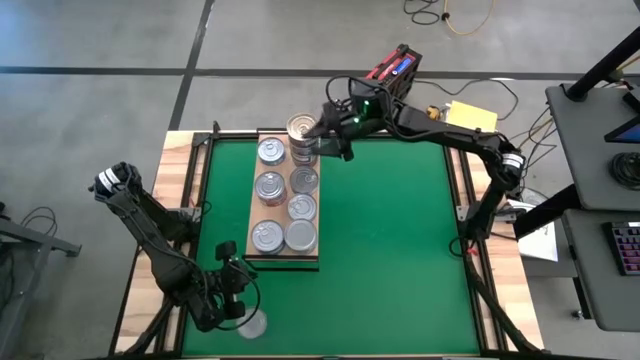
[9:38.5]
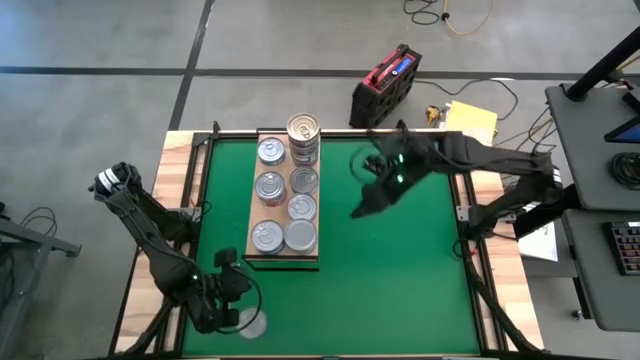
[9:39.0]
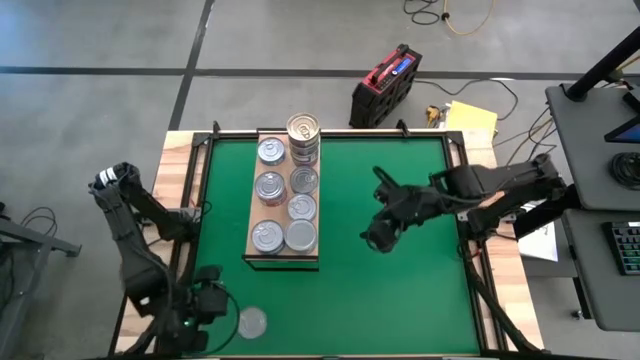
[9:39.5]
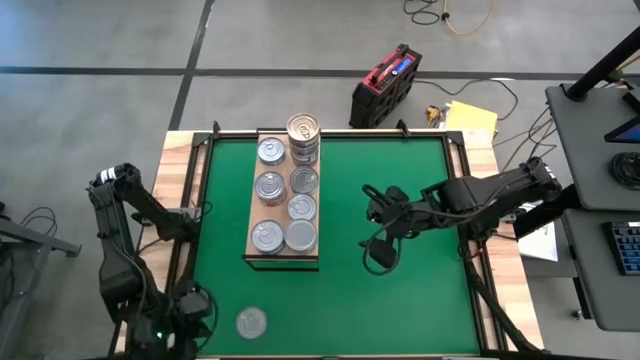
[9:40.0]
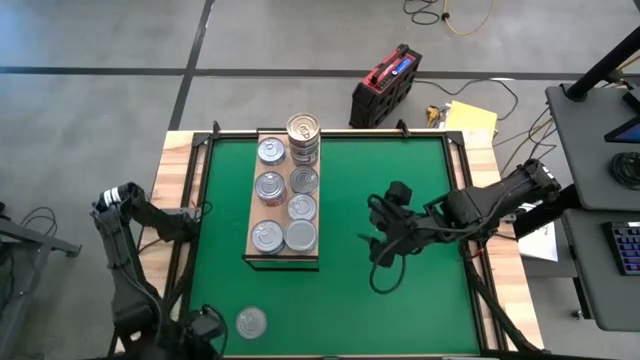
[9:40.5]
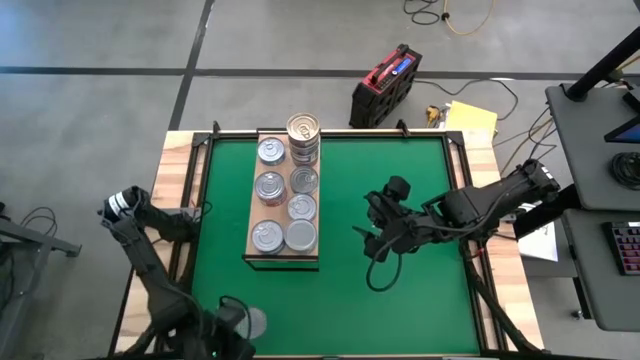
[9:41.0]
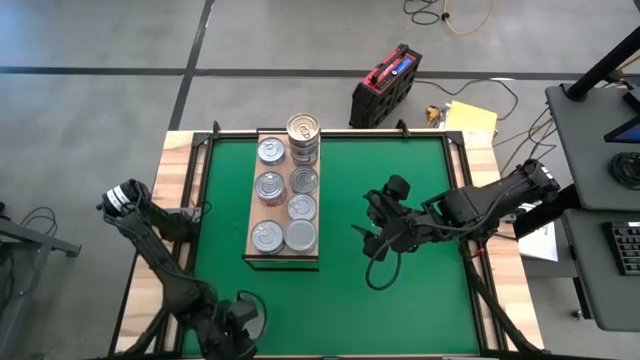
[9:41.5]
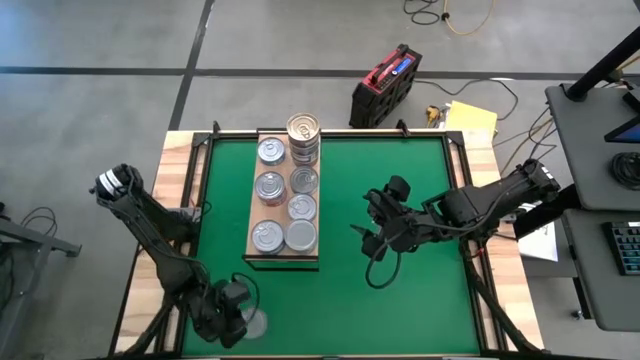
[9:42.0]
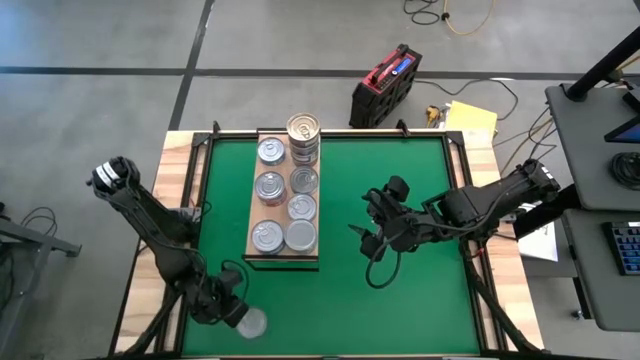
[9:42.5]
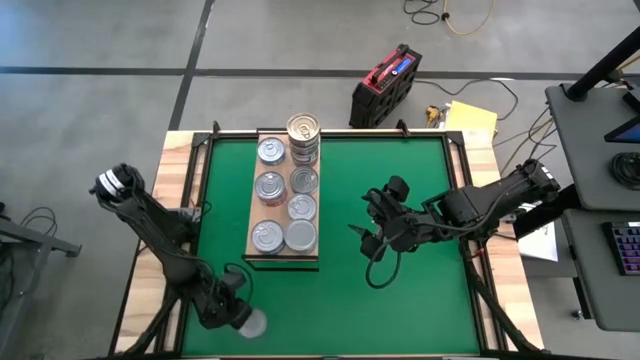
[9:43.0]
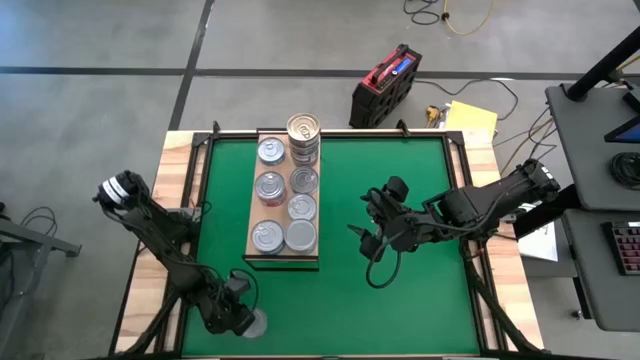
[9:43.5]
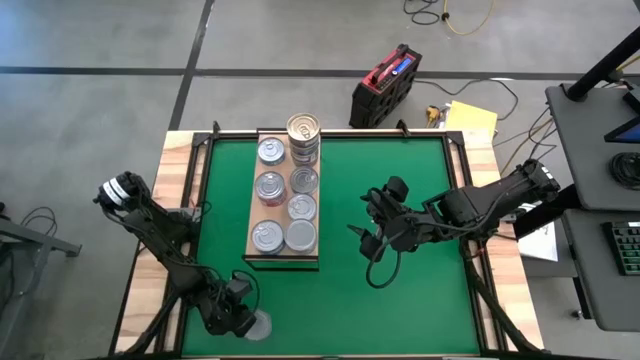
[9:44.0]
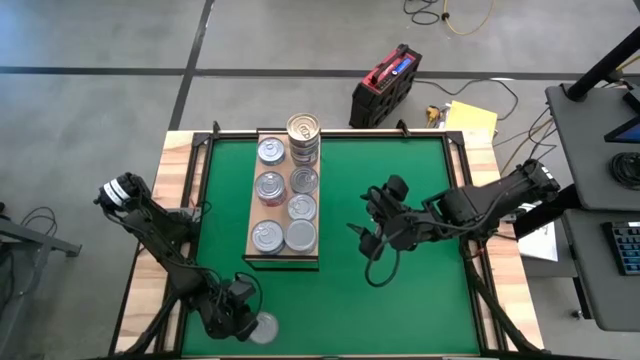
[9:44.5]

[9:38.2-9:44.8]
Task: Stack canned seafood by type on shelf
Stack the blue tuna can on top of the blue tuna cans on the shelf

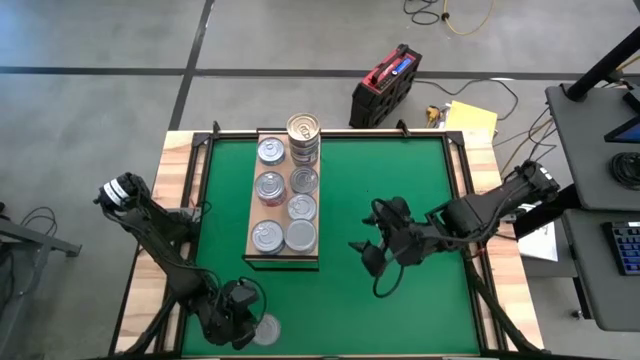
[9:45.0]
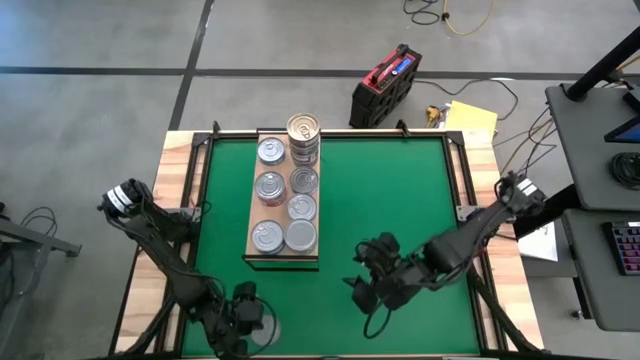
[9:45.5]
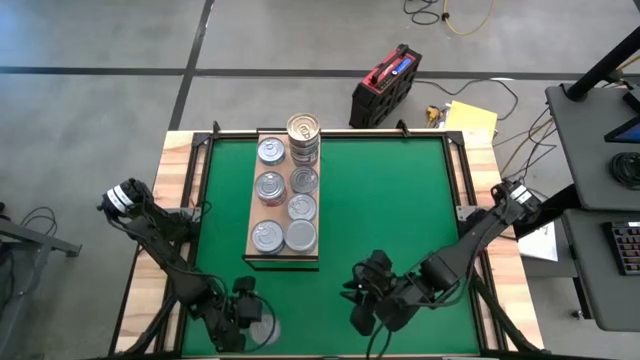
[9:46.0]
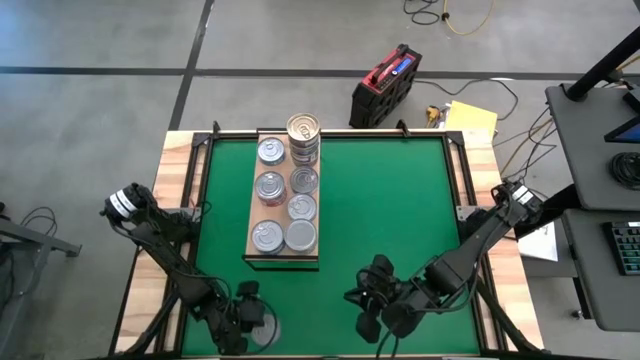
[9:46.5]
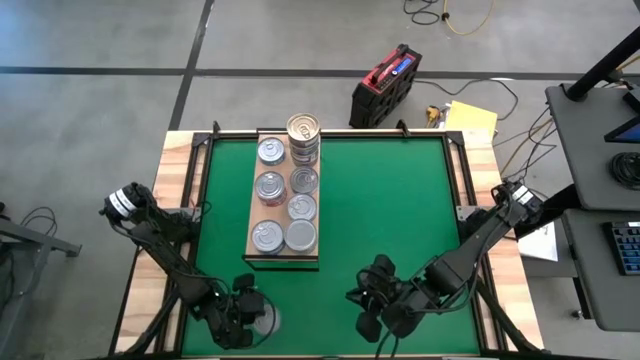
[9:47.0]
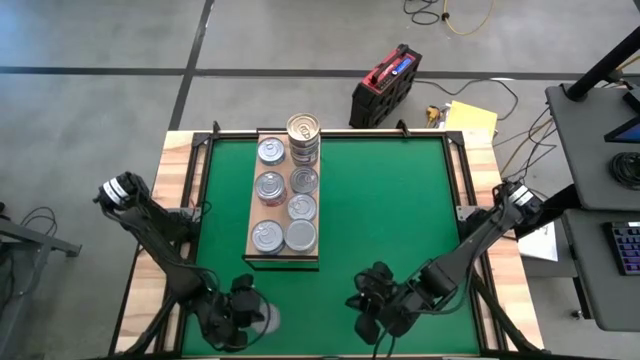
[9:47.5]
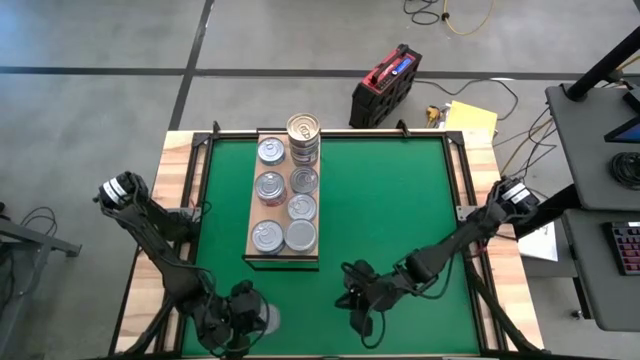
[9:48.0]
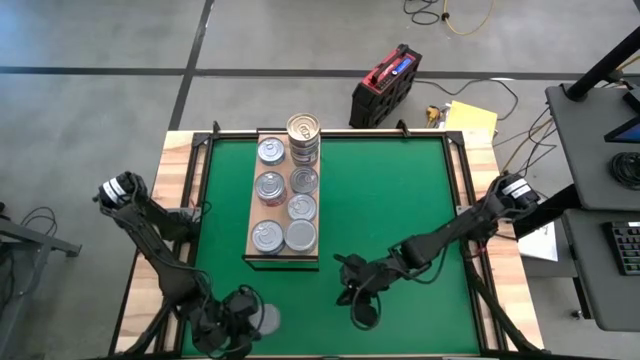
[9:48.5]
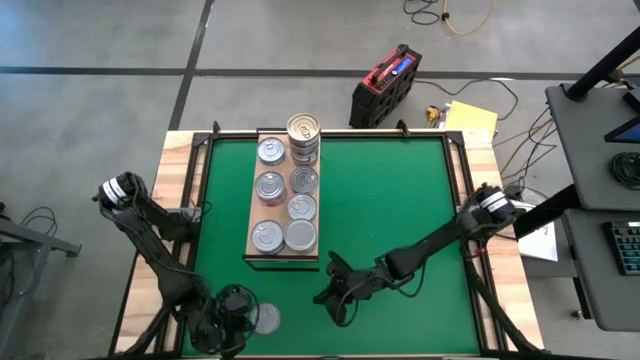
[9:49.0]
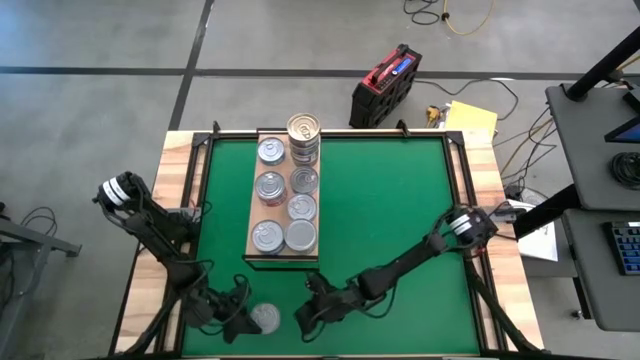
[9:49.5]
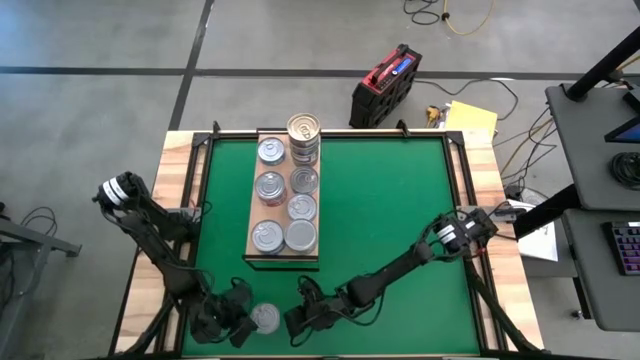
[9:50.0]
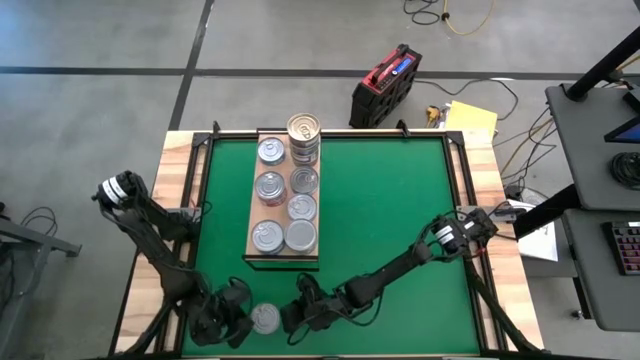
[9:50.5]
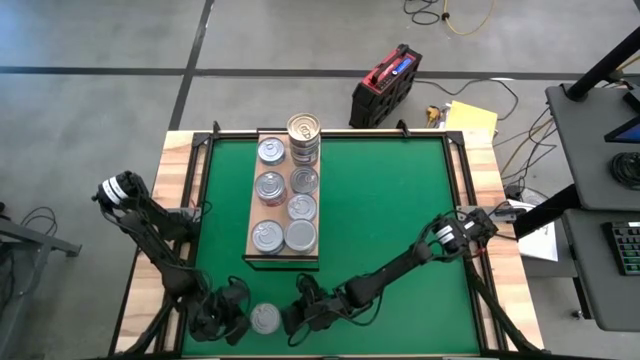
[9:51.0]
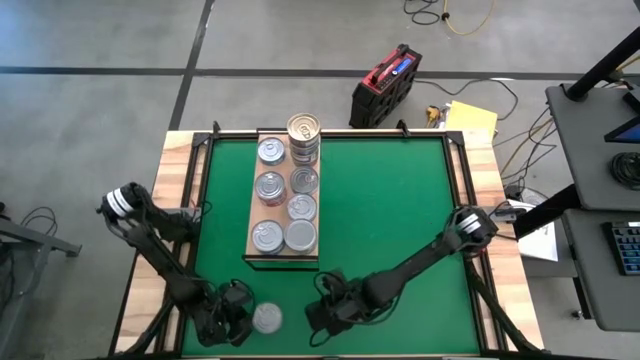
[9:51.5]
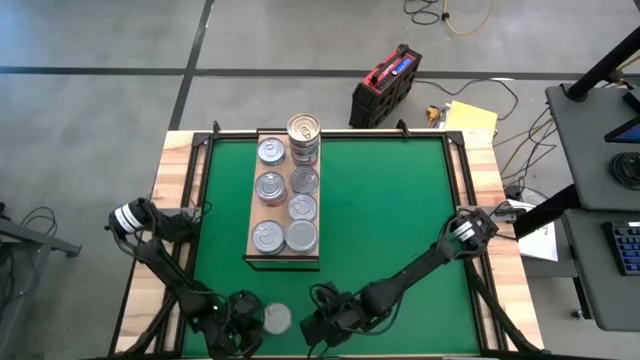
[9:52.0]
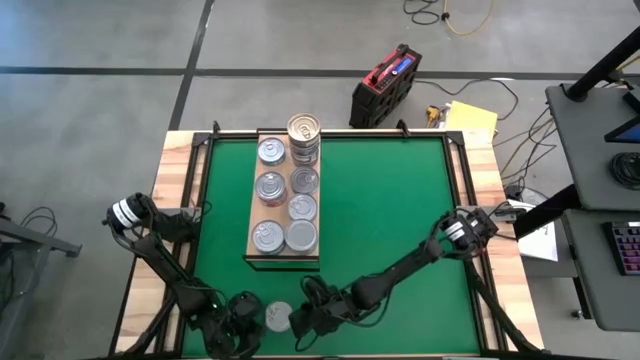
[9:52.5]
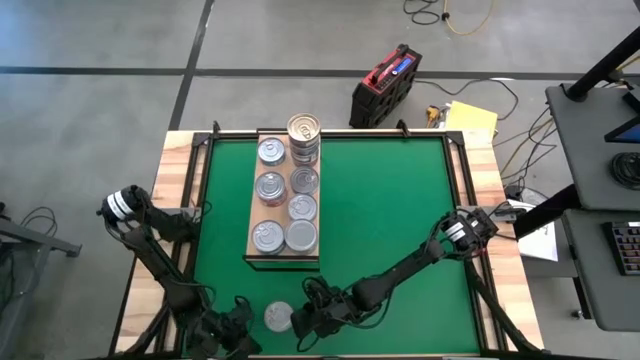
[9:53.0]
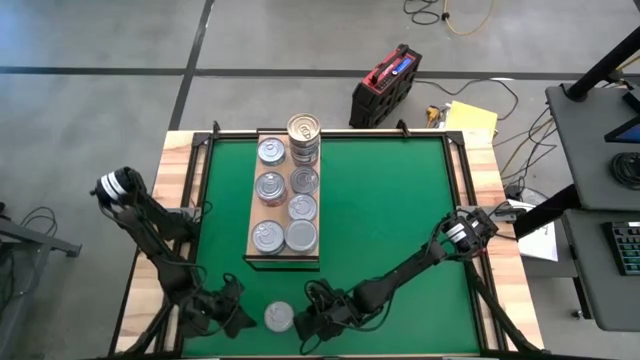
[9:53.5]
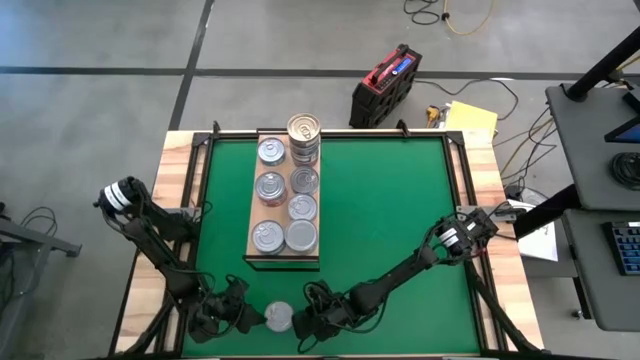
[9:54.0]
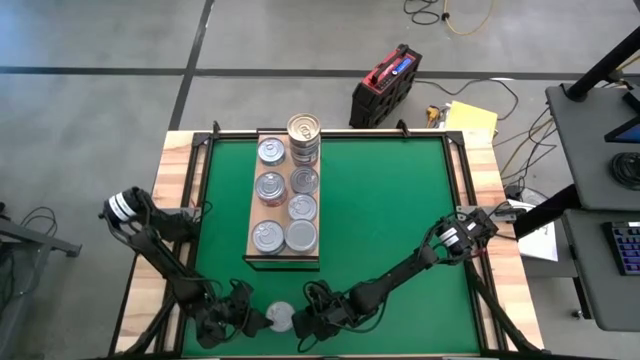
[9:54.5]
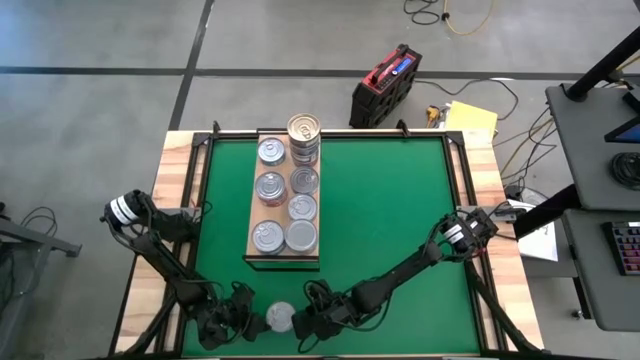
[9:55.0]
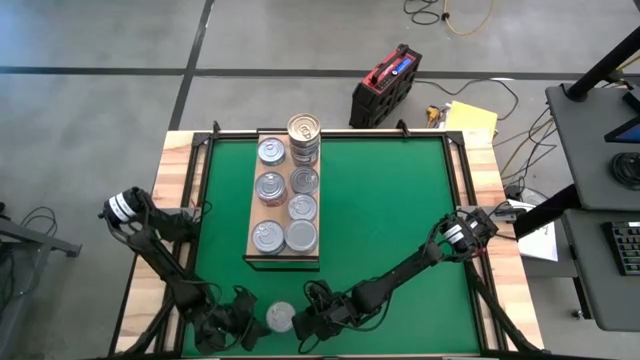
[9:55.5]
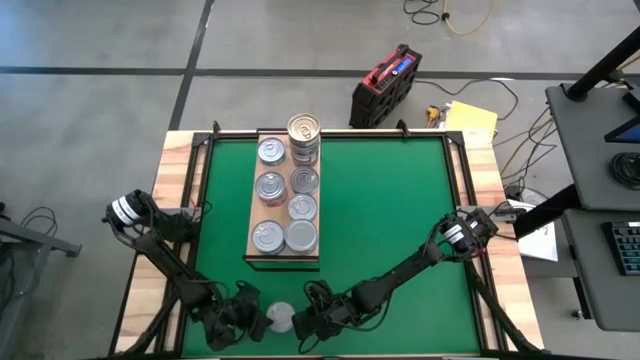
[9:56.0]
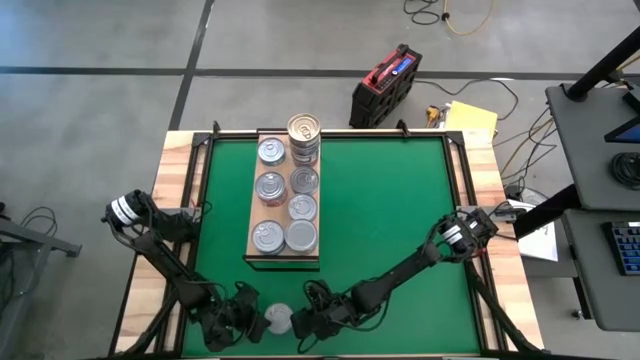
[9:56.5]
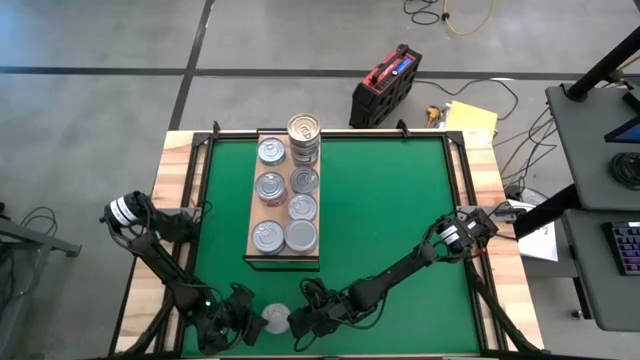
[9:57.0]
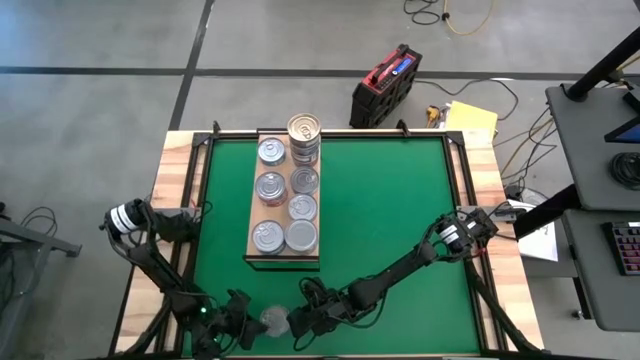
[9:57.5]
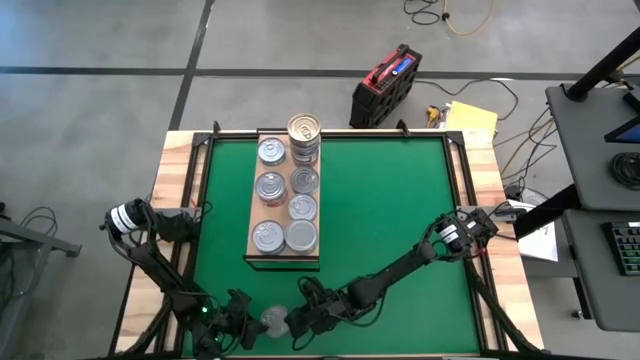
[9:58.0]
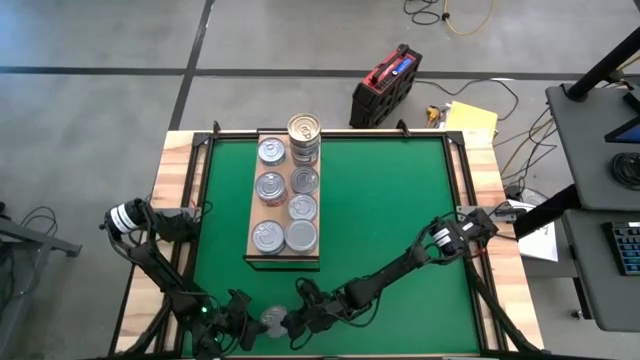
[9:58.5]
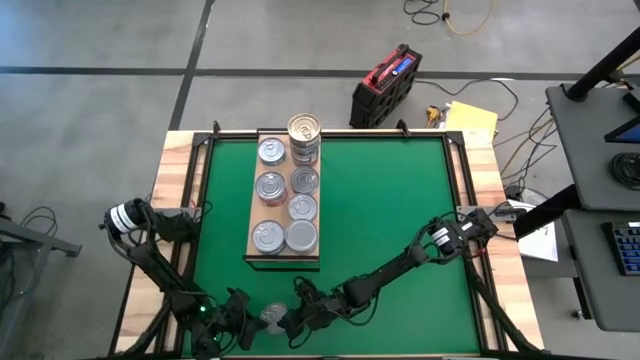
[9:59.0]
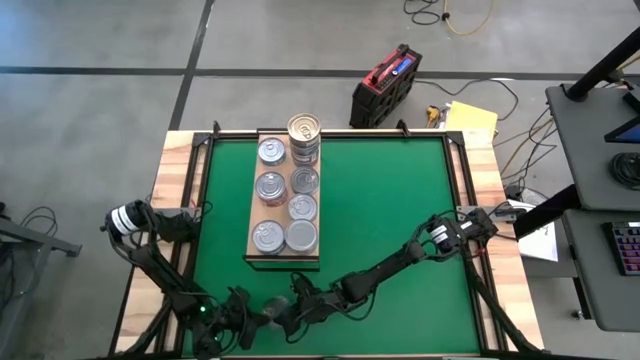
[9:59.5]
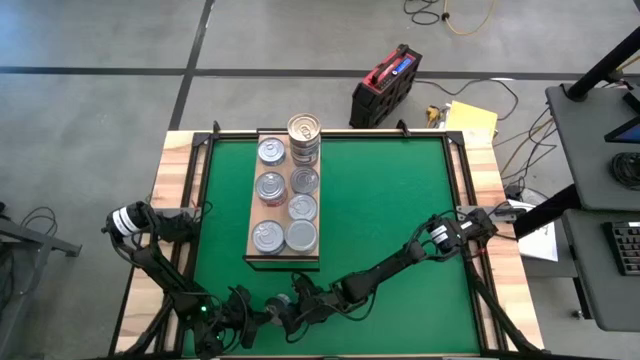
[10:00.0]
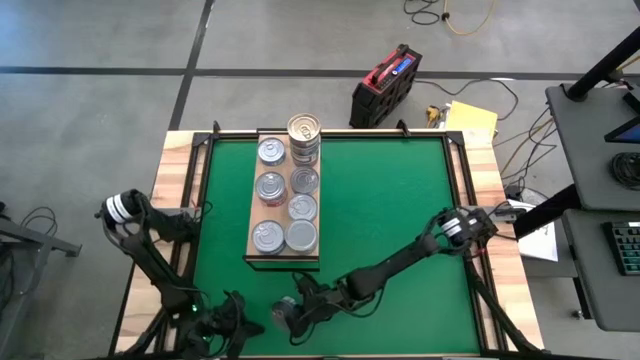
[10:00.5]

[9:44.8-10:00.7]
Stack the blue tuna can on top of the blue tuna can on the shelf
